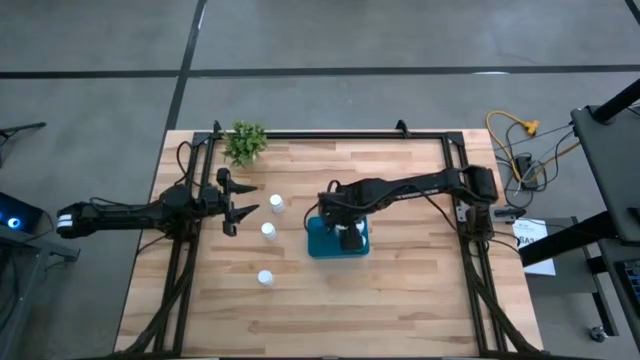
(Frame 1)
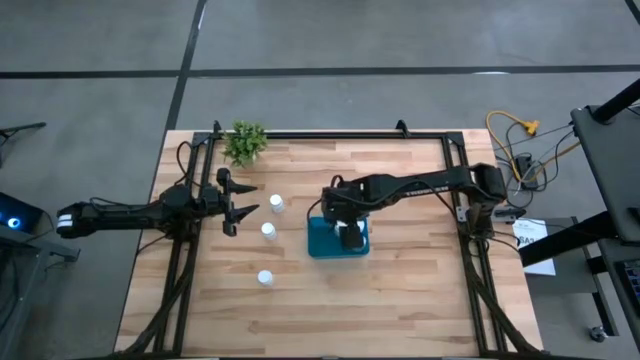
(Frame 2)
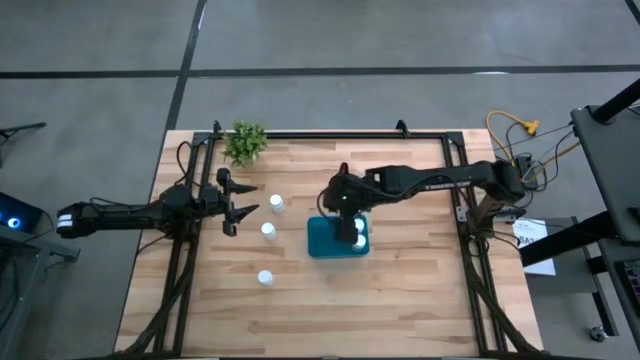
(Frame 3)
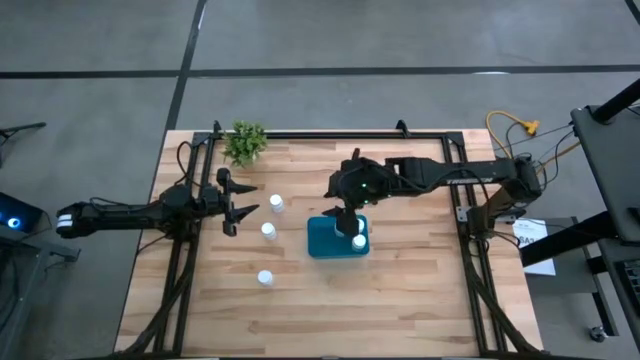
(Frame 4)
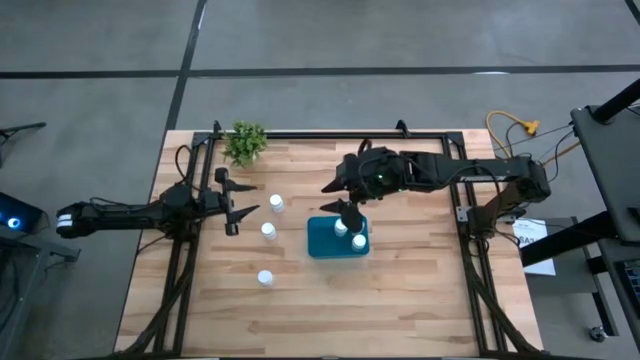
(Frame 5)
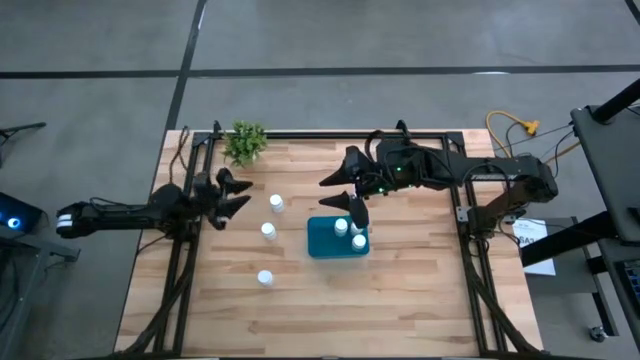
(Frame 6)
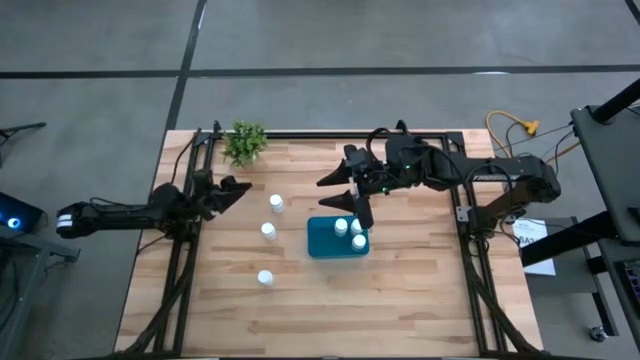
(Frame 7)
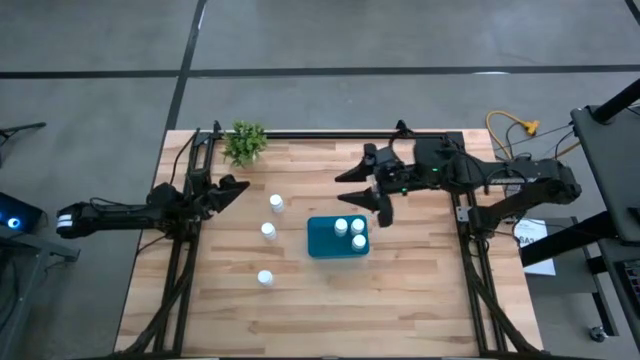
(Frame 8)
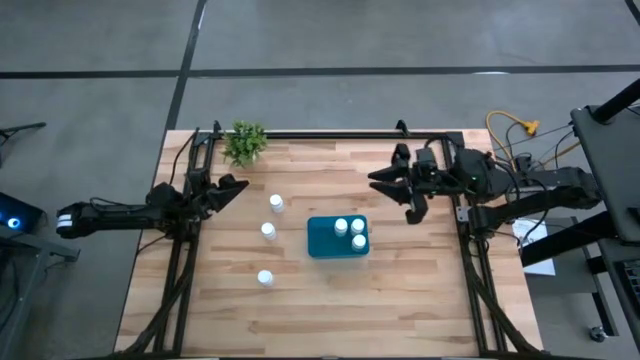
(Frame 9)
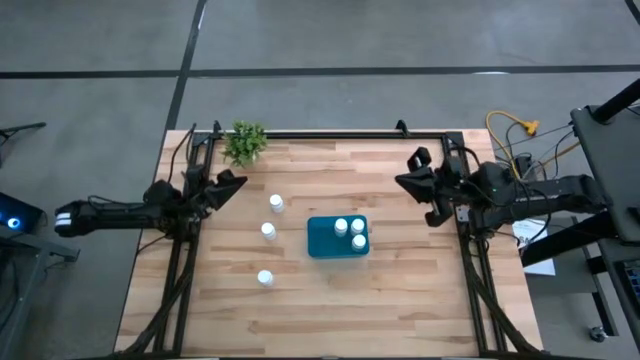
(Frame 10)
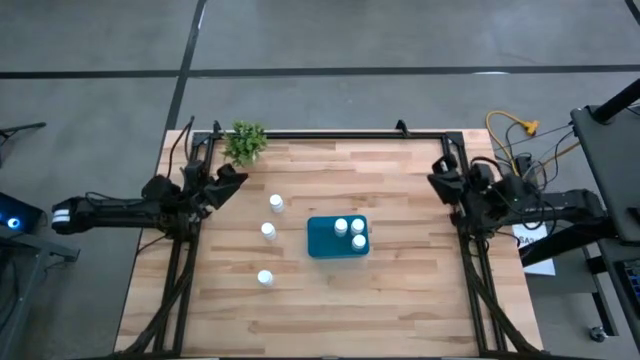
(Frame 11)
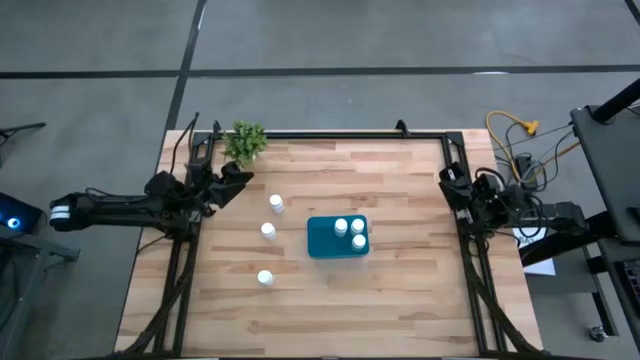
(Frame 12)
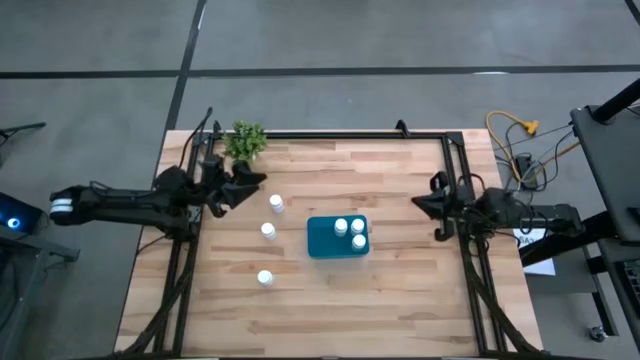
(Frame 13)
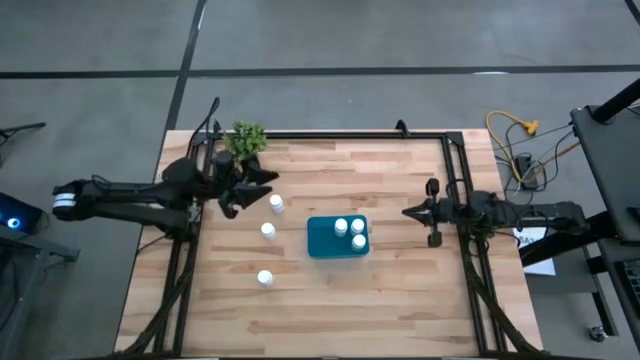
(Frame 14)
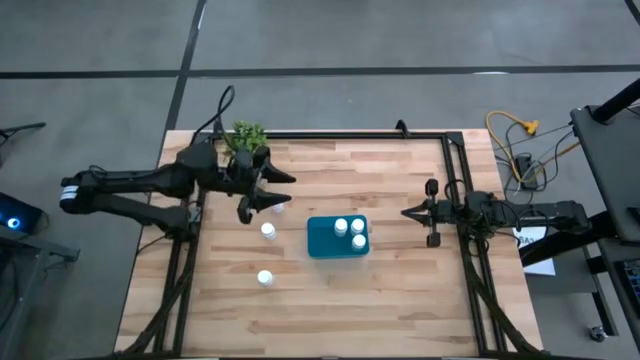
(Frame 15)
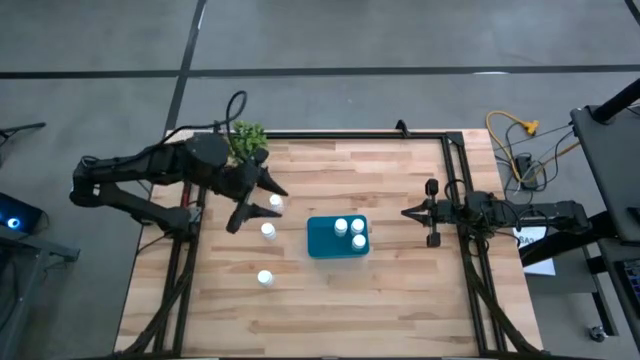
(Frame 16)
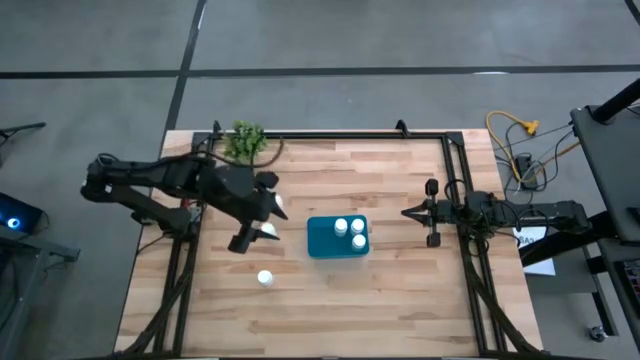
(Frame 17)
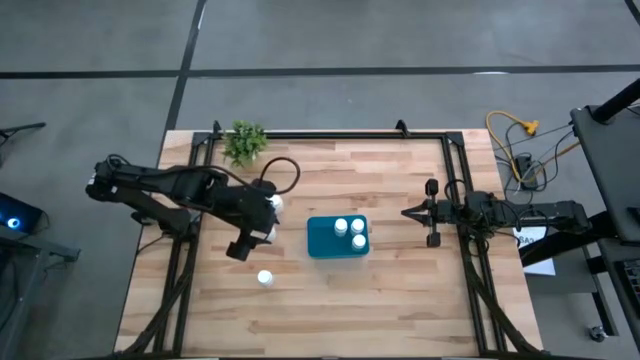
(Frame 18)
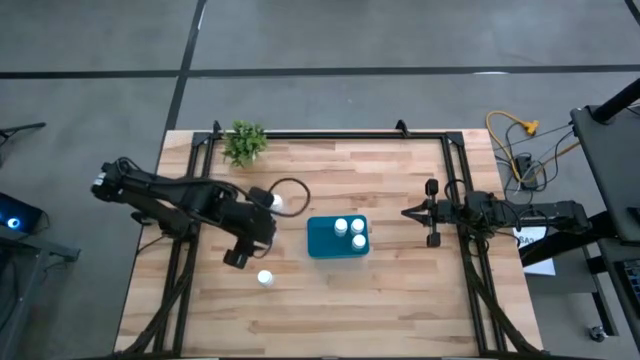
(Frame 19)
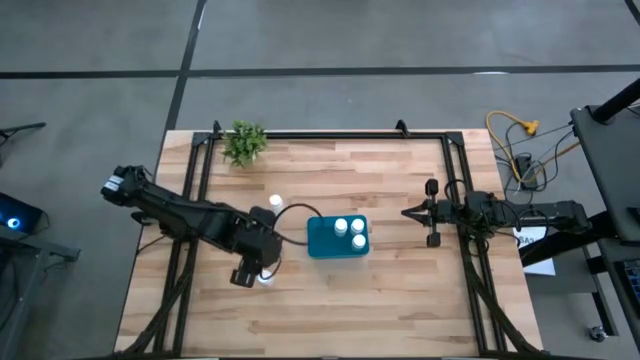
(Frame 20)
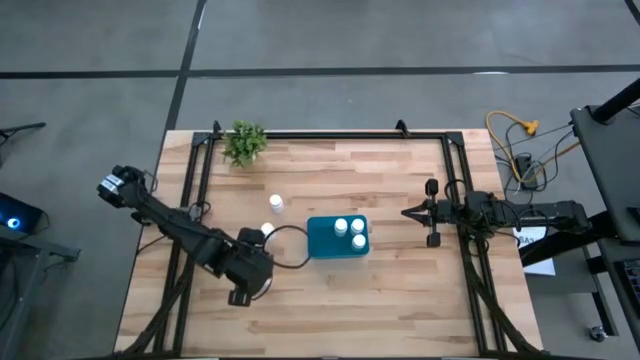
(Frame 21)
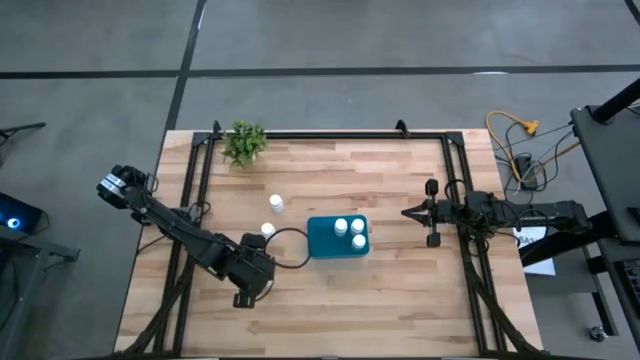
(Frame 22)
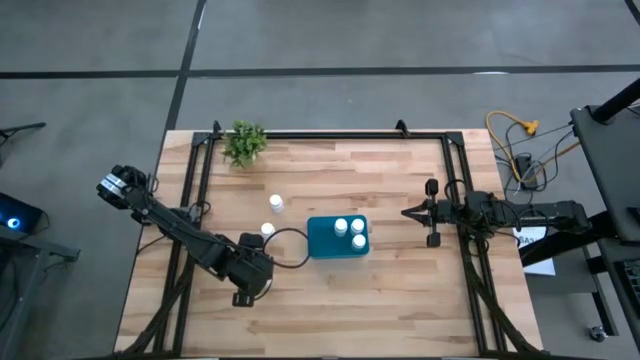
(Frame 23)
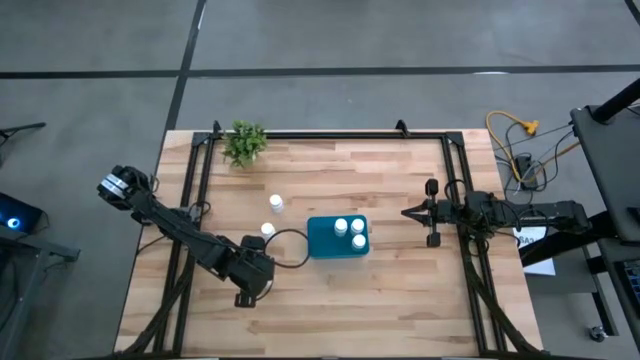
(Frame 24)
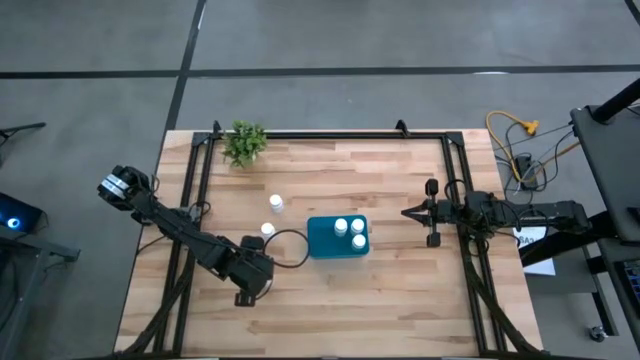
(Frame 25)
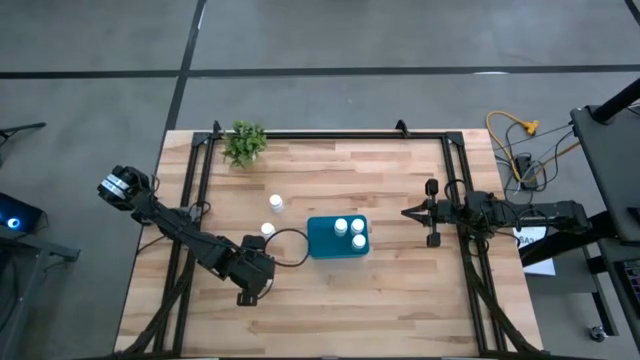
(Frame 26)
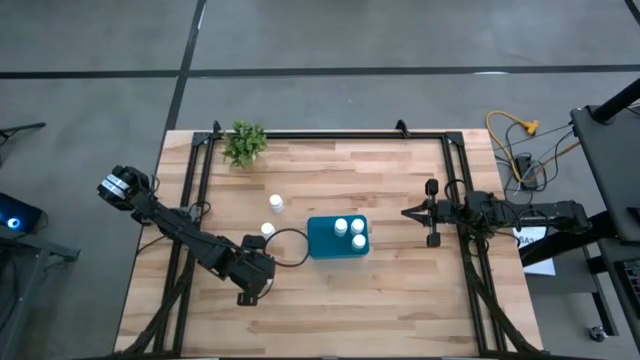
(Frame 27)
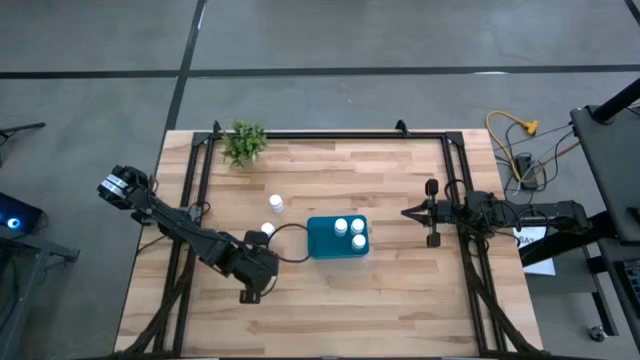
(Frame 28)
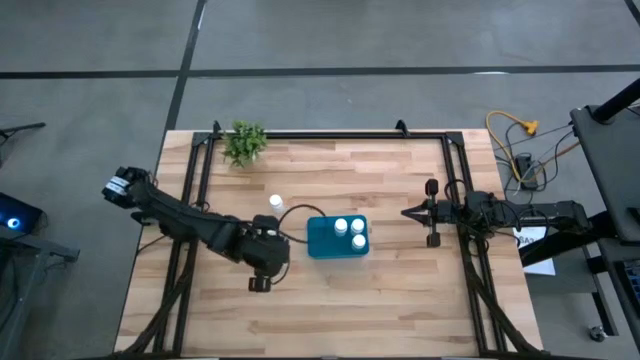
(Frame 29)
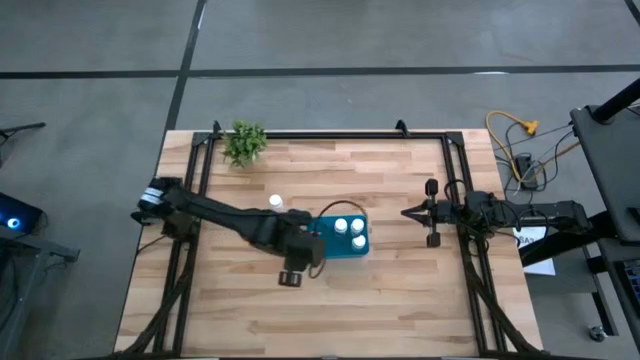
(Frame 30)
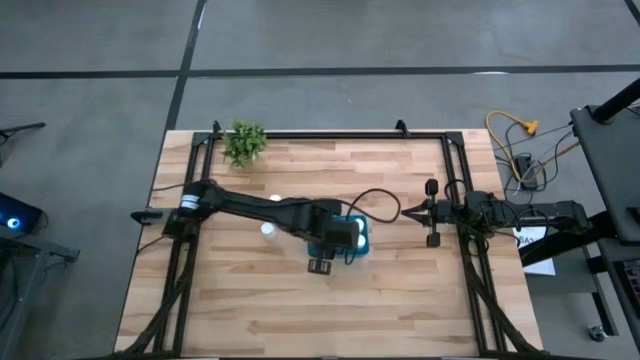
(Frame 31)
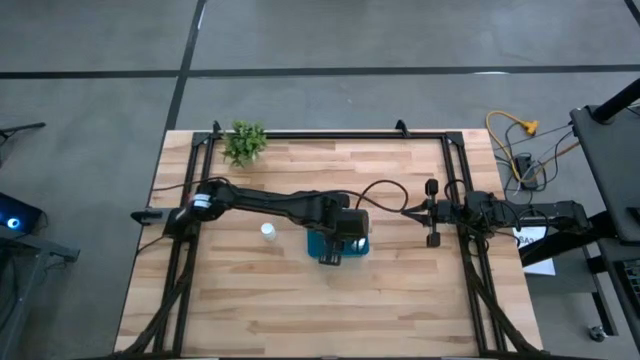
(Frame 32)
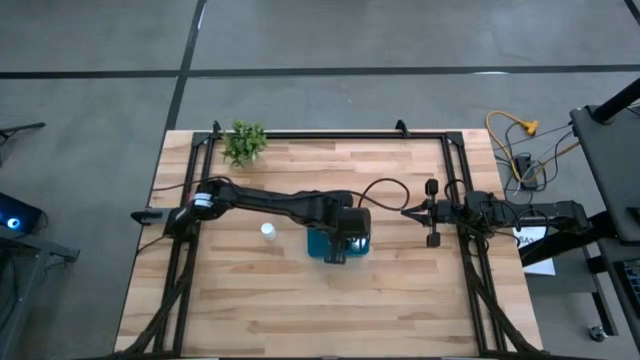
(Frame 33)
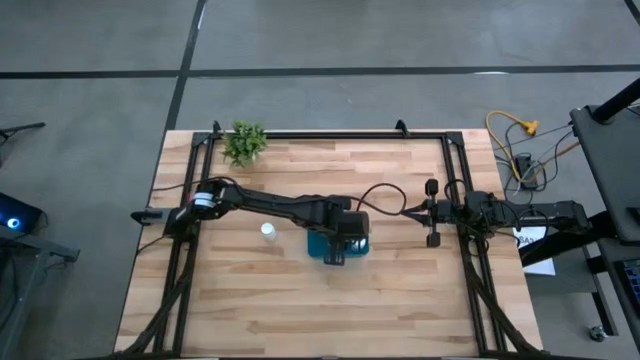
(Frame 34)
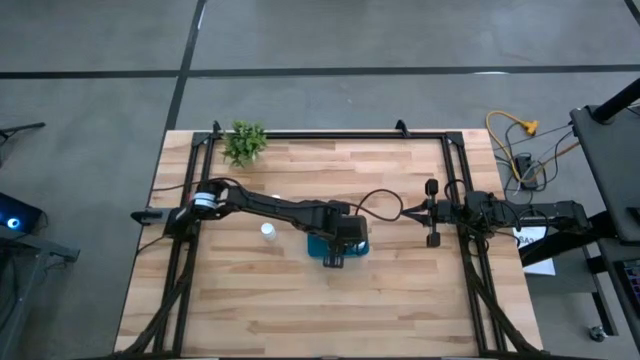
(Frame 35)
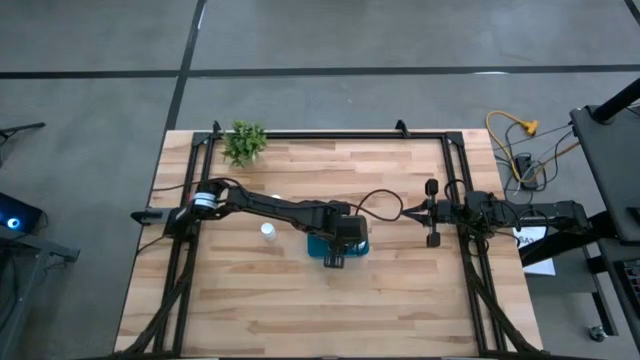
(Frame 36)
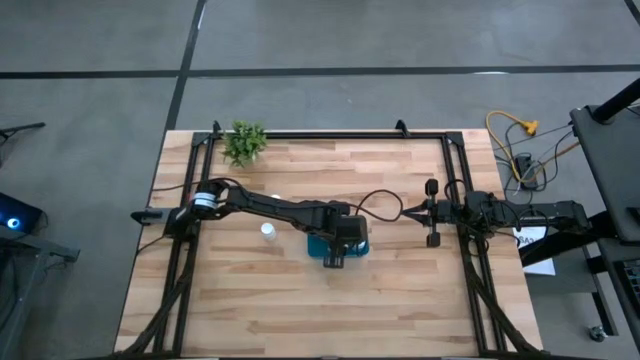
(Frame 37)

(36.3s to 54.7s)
Task: Pick and place pill bottles into a basket
Put the white pill bottle into the blue bin

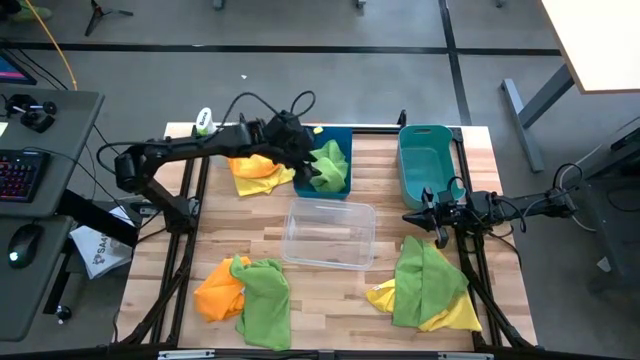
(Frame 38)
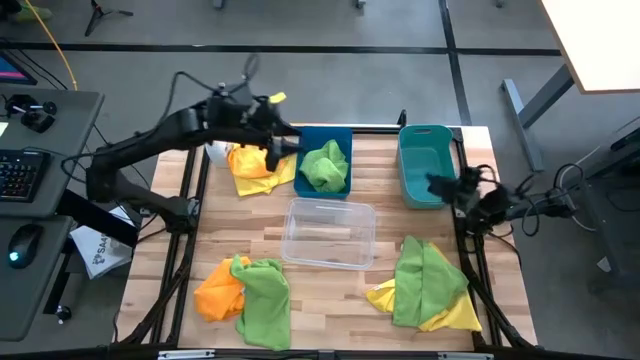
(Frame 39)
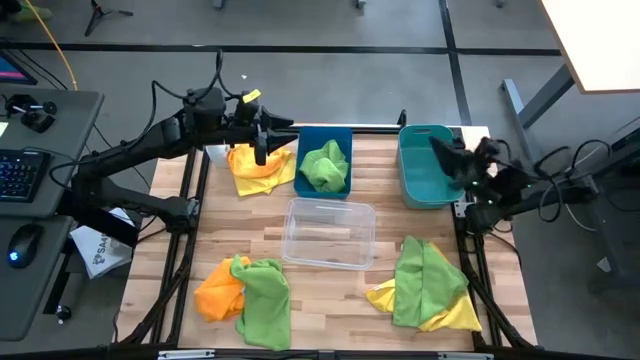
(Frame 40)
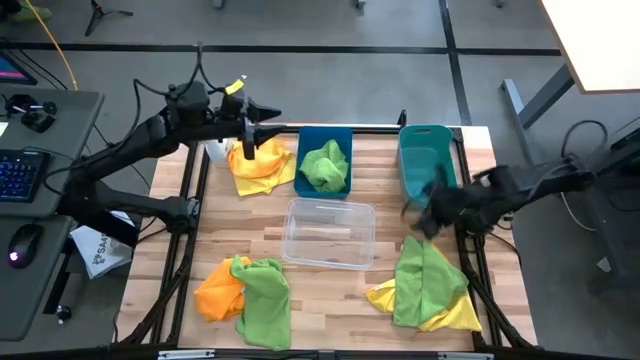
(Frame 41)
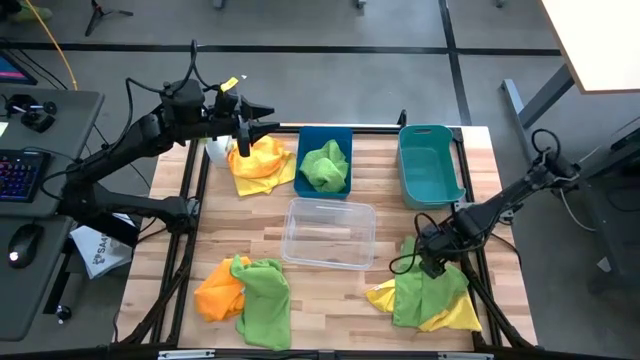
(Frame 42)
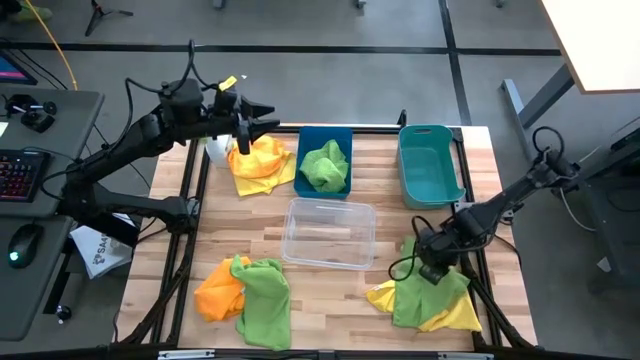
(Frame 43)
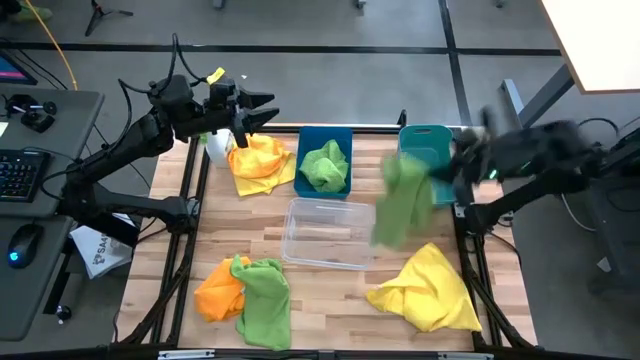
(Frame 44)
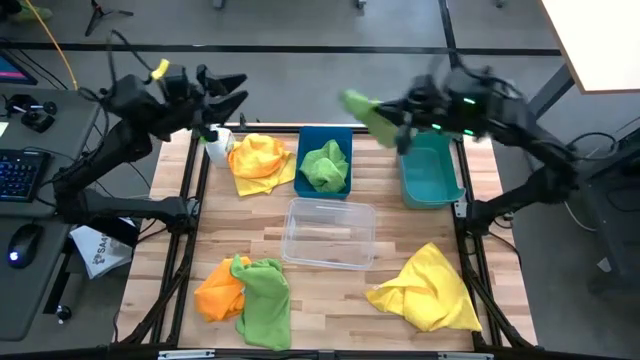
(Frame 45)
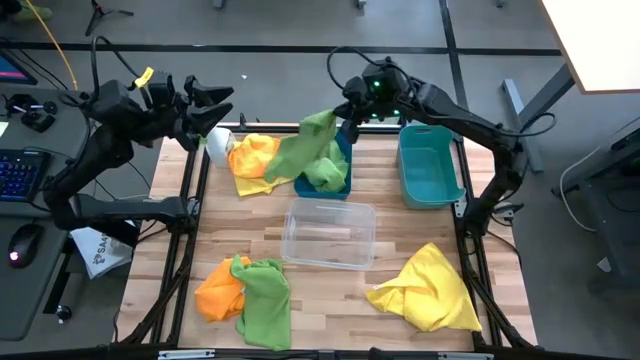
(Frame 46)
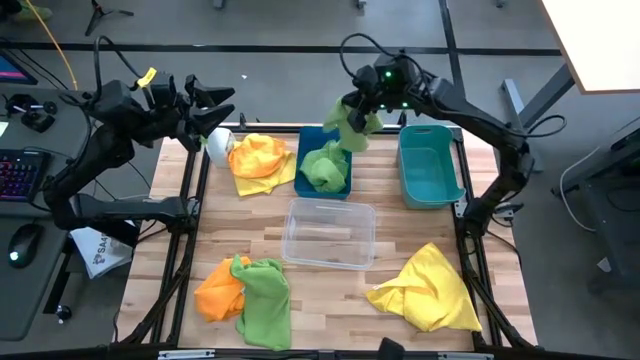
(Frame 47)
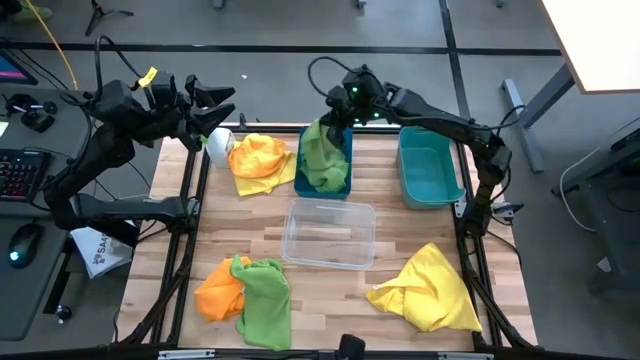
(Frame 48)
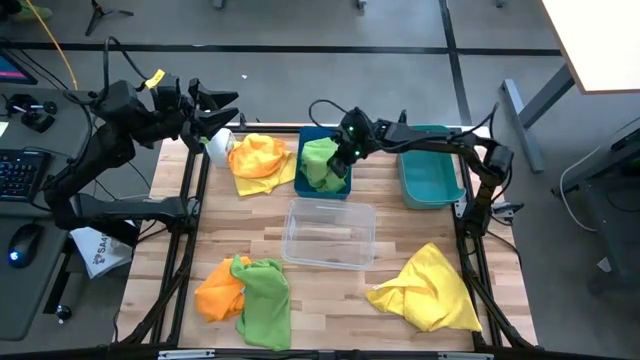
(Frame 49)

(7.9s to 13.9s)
Task: Sort microfiber towel by color & place in baskets
Put the right green microfiber cloth into the blue bin
